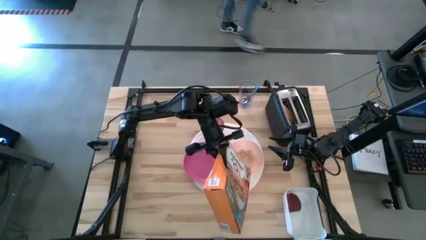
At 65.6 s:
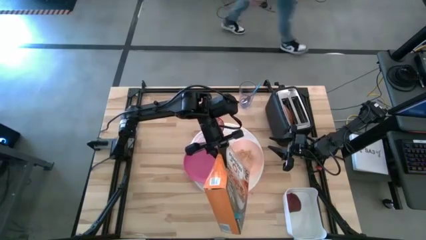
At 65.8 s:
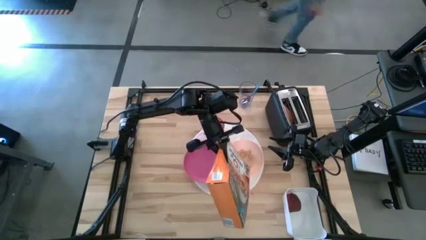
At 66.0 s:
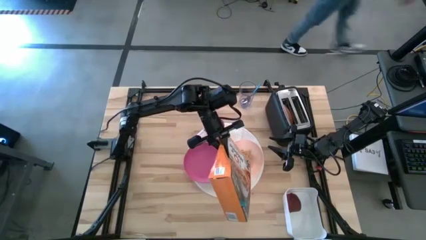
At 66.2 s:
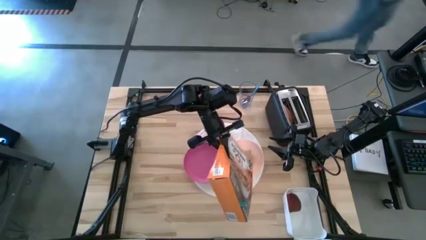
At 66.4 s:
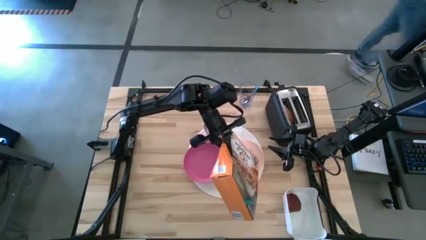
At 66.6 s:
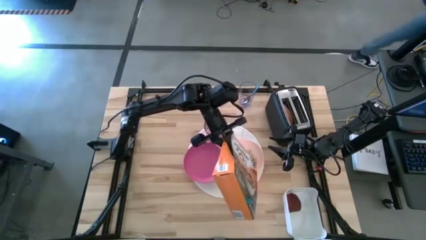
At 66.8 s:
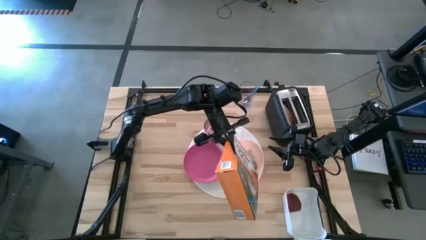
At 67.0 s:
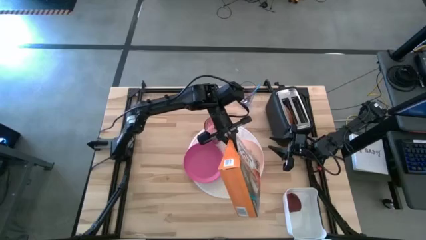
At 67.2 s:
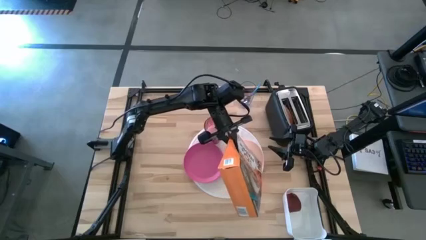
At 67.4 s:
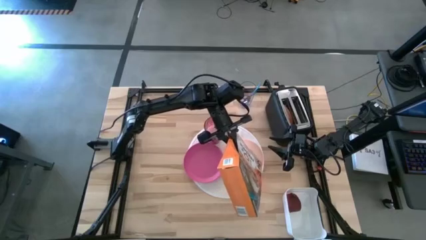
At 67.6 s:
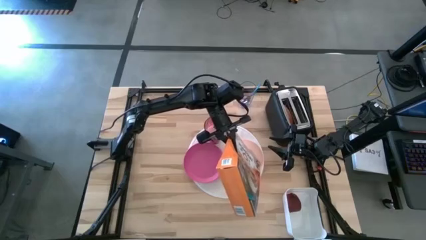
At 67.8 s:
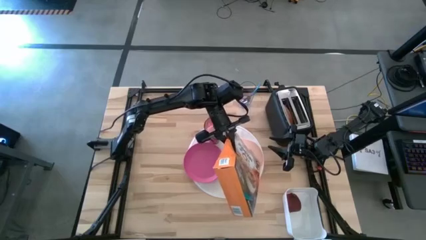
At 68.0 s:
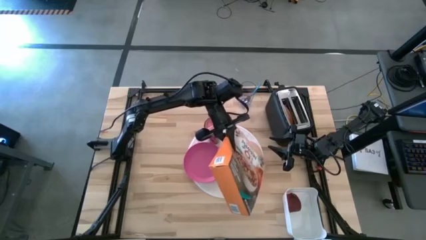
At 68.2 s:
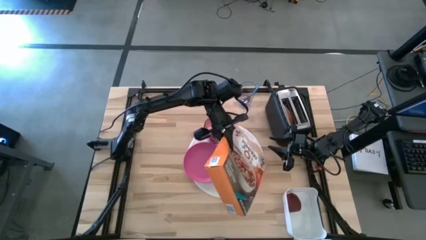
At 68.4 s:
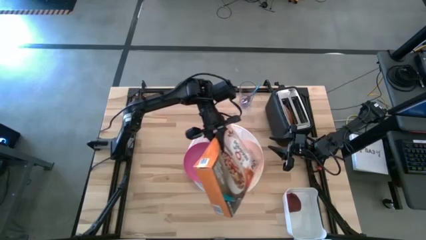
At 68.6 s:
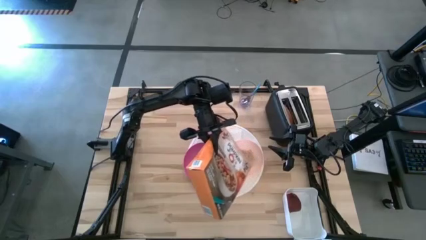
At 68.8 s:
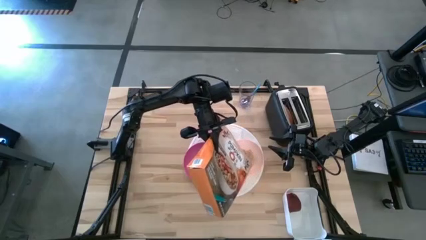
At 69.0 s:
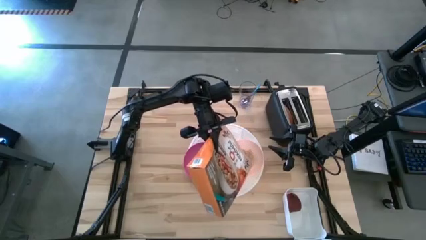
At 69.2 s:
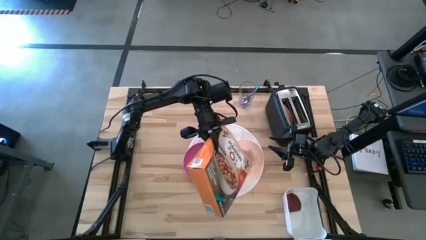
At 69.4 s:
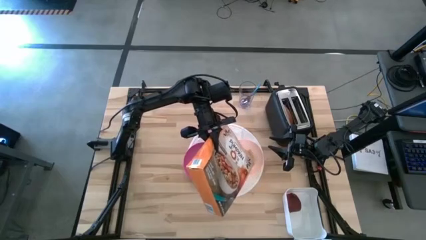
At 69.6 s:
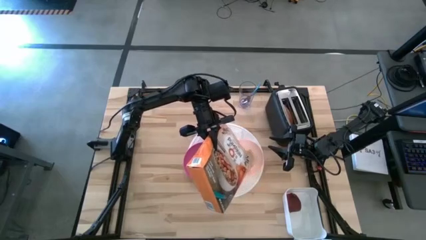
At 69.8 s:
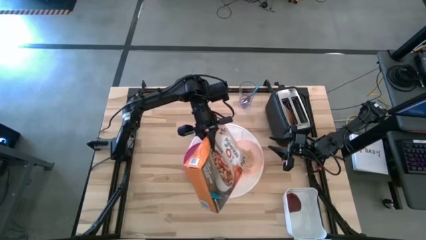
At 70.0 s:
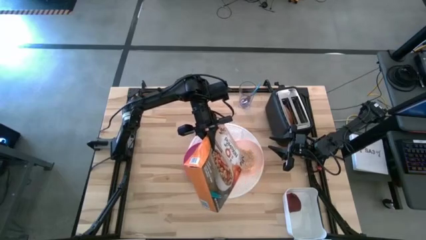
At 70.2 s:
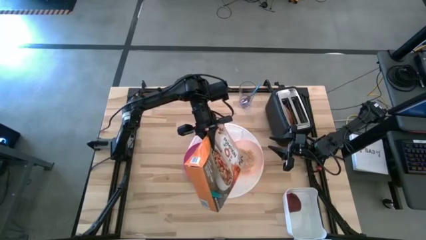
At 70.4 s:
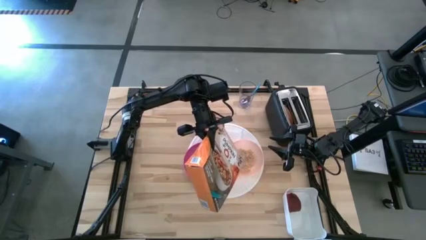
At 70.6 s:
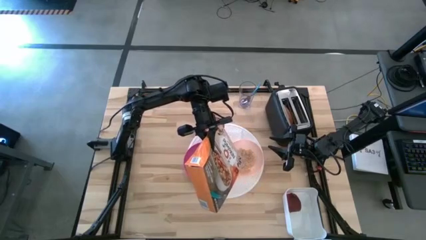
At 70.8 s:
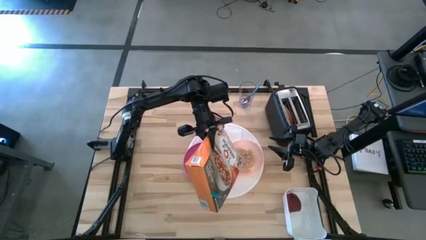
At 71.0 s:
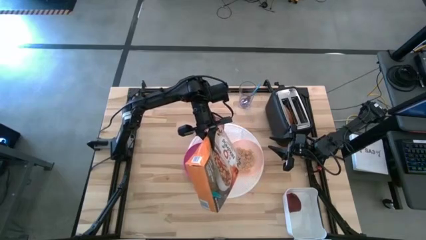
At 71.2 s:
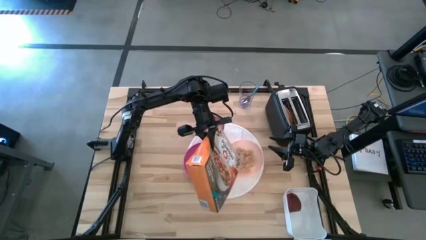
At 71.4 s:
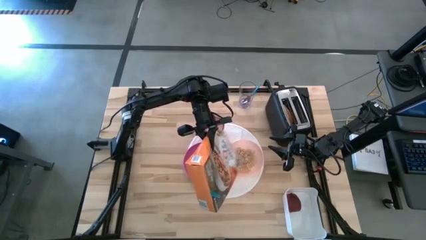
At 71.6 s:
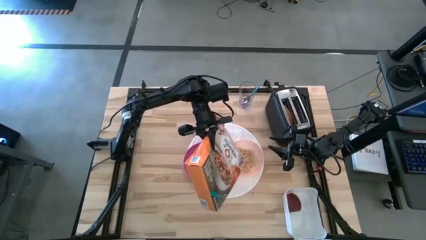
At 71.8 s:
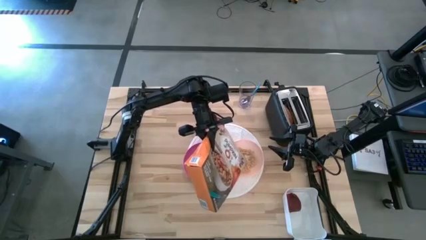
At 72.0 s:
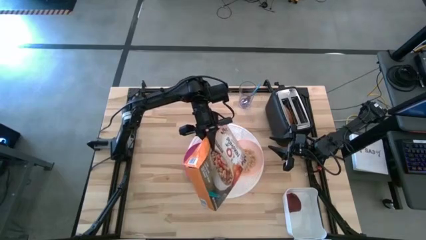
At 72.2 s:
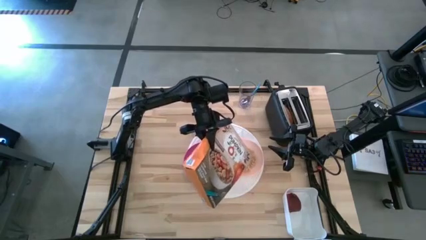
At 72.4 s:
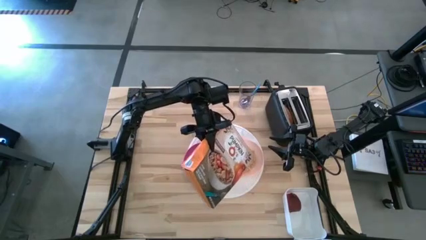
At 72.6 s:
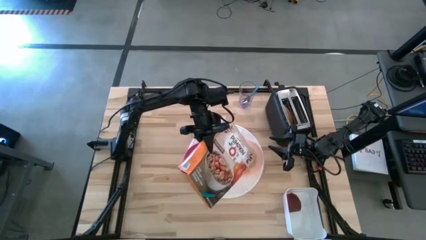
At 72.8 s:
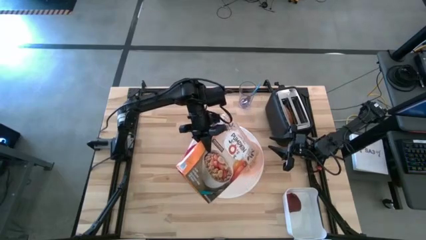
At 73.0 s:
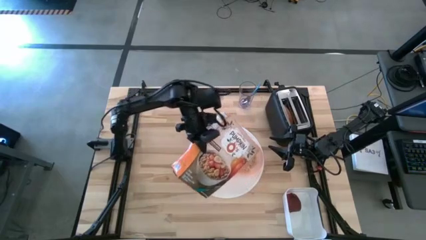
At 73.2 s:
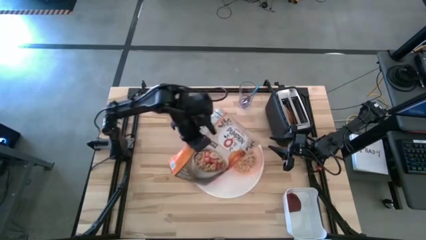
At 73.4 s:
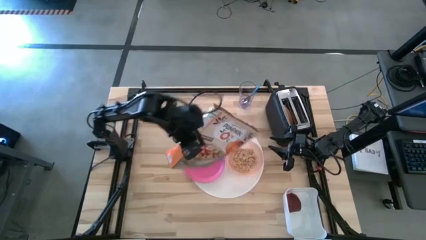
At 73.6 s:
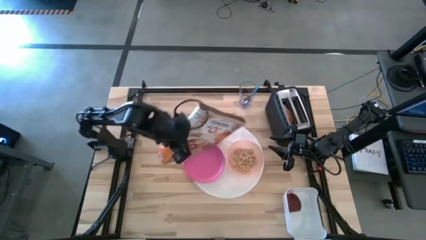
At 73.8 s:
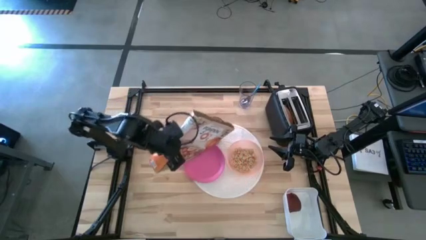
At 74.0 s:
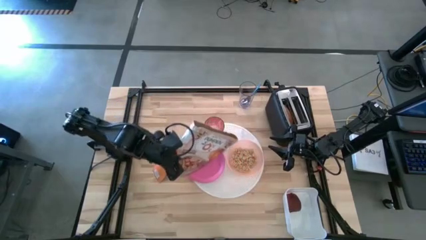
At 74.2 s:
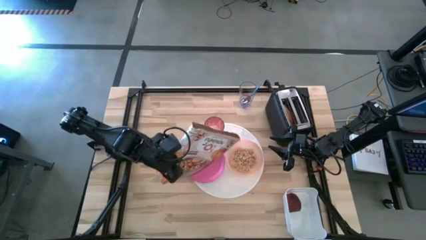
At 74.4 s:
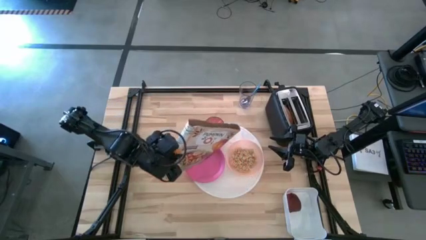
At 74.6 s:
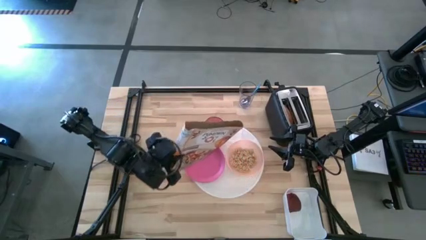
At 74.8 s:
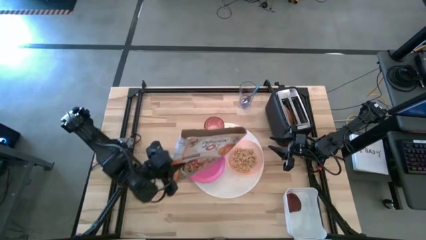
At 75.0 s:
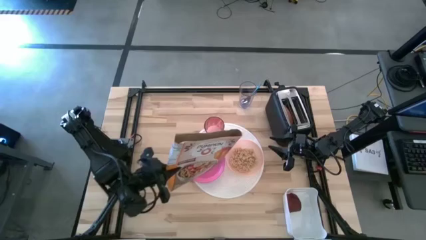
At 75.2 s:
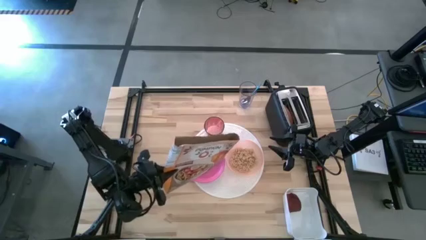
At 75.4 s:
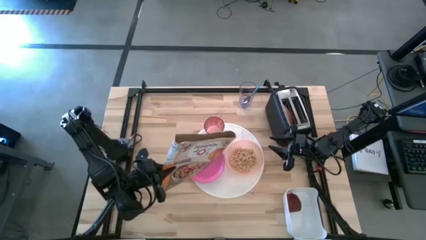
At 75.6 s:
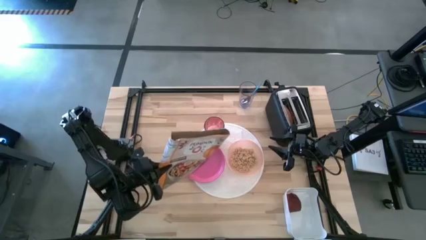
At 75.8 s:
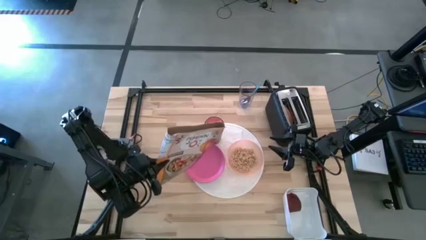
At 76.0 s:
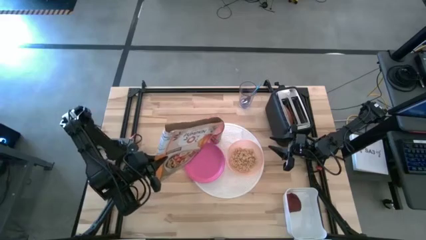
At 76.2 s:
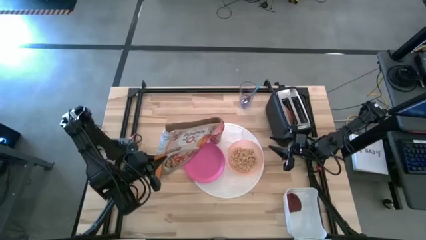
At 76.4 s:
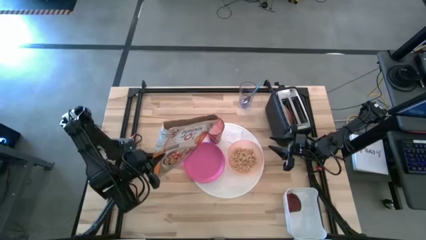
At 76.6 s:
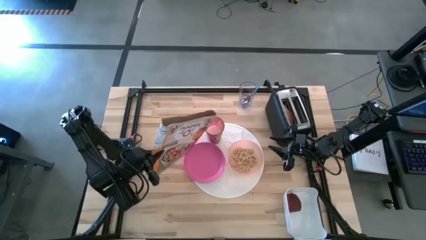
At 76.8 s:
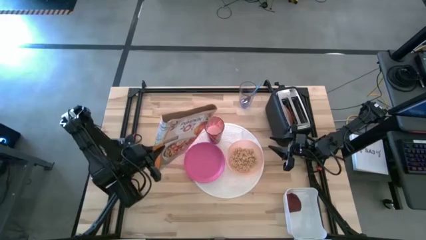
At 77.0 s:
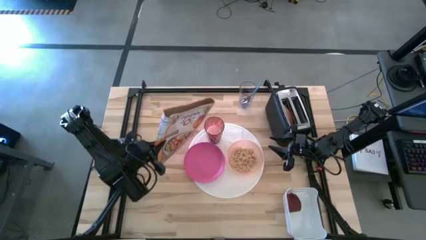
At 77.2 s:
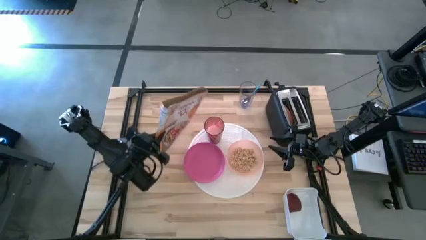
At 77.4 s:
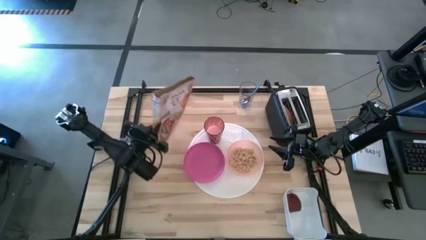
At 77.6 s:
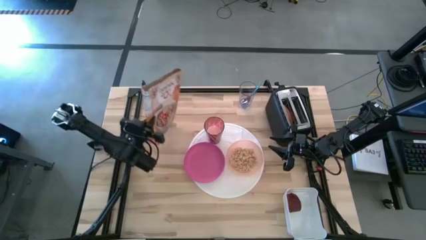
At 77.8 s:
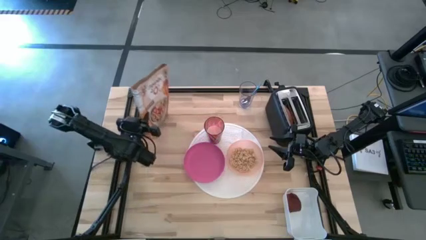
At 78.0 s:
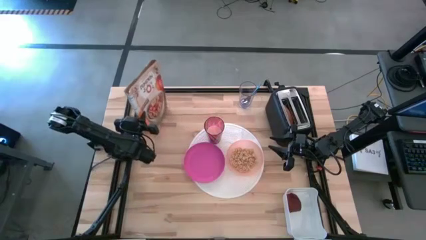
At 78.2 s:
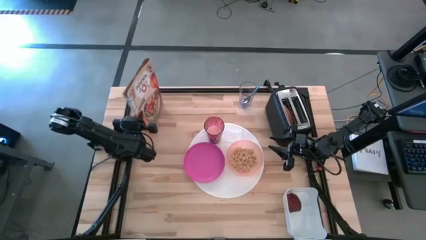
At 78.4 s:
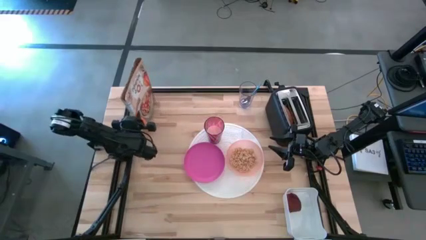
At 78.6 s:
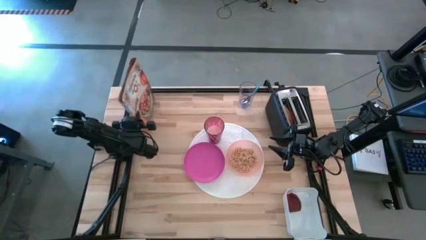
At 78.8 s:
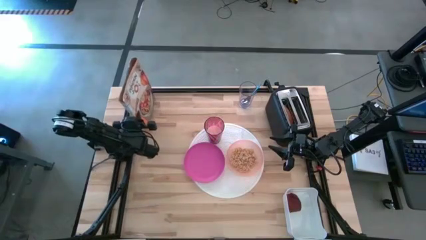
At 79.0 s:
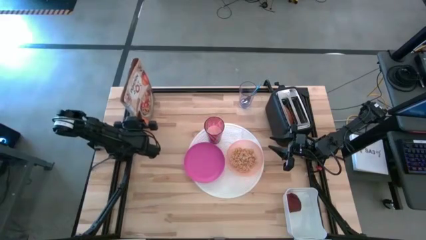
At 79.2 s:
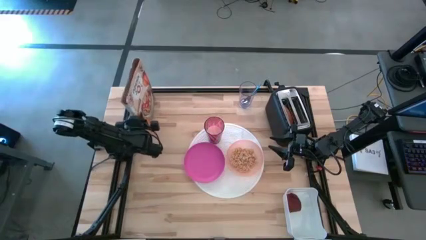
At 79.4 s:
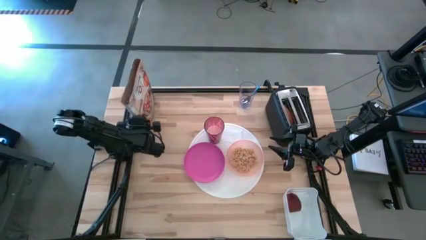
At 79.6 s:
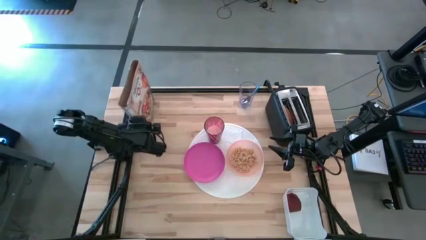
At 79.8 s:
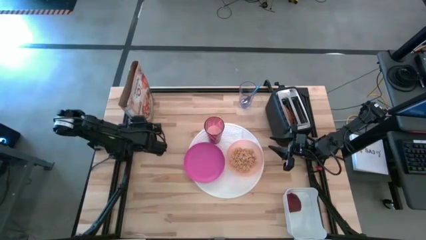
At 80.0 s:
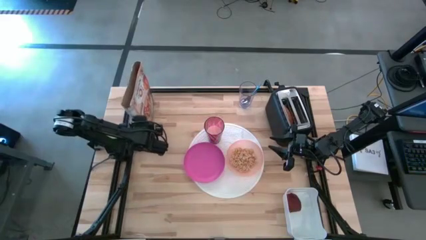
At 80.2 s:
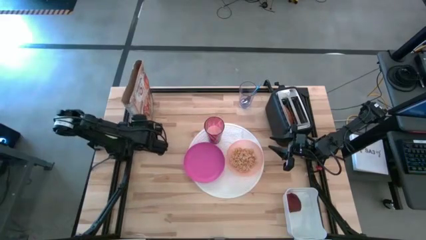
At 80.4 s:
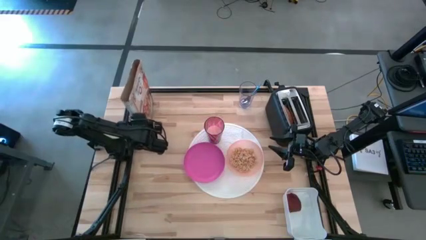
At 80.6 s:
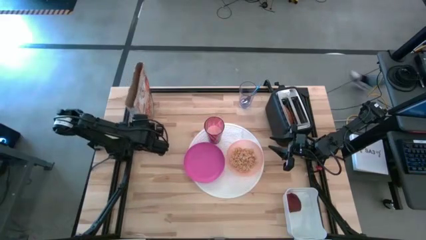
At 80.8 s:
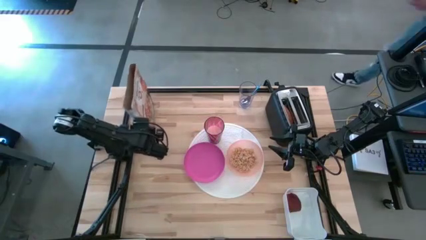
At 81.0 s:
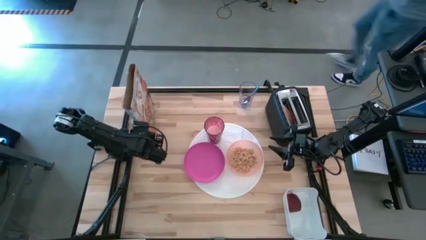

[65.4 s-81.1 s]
Task: Arrange a breakfast setting
Pour the cereal into the light orange bowl
